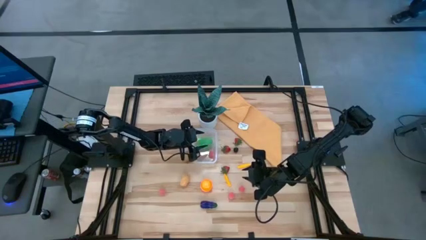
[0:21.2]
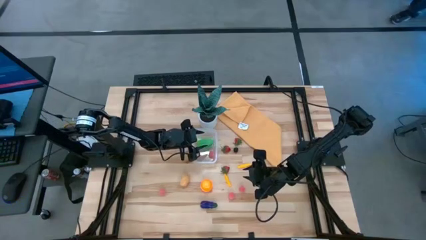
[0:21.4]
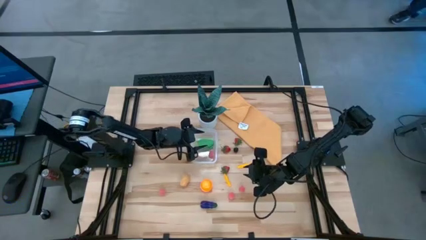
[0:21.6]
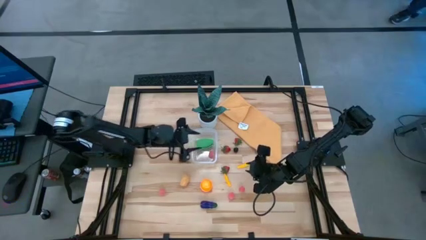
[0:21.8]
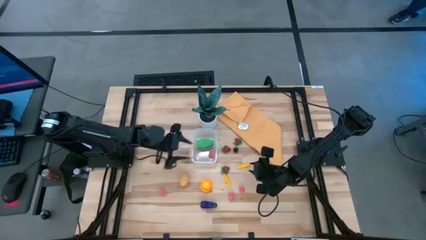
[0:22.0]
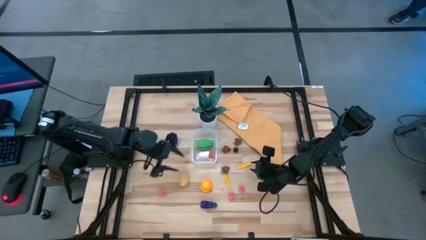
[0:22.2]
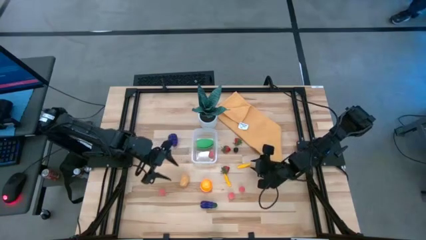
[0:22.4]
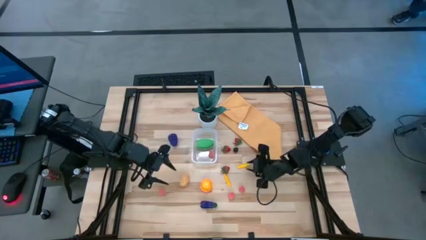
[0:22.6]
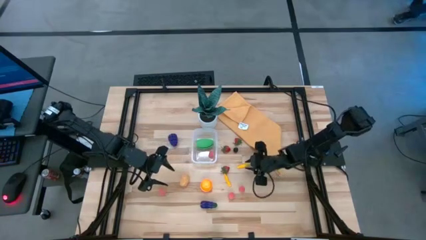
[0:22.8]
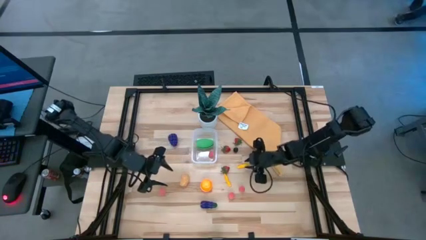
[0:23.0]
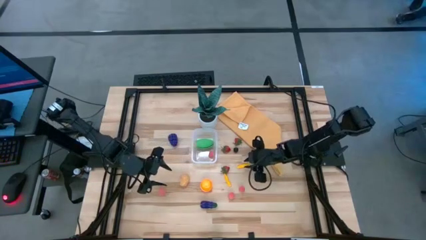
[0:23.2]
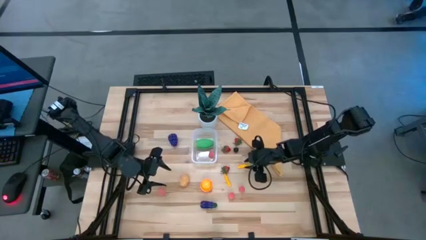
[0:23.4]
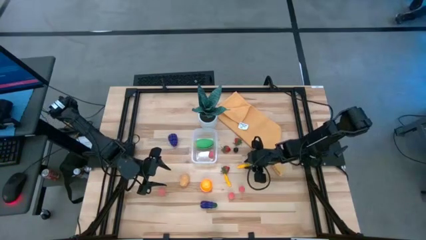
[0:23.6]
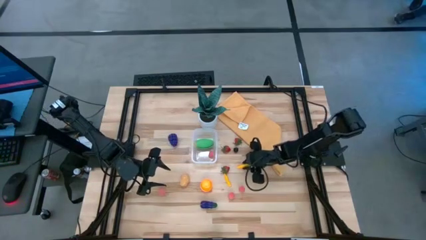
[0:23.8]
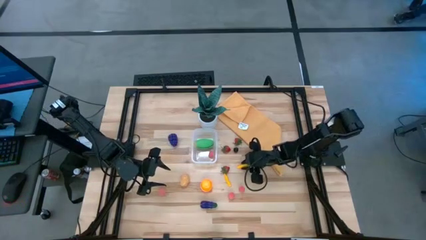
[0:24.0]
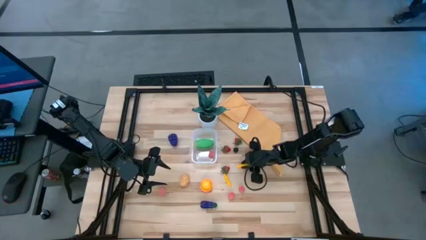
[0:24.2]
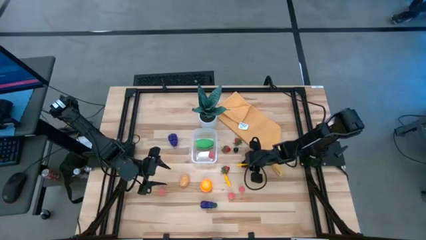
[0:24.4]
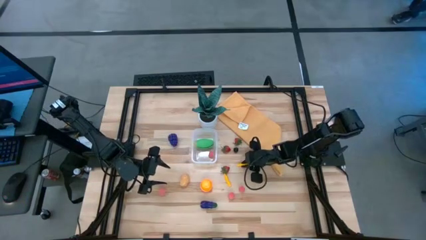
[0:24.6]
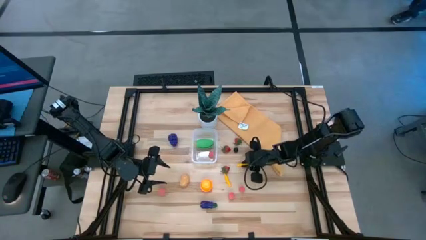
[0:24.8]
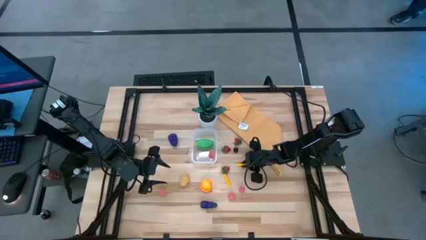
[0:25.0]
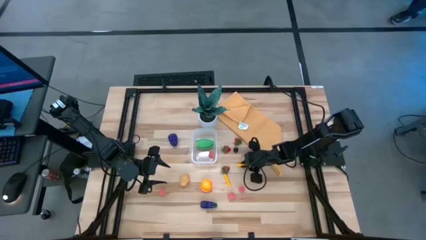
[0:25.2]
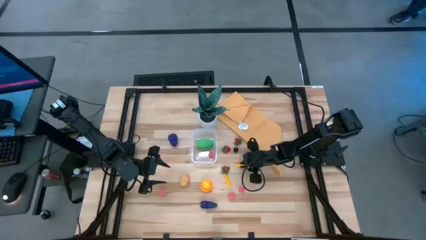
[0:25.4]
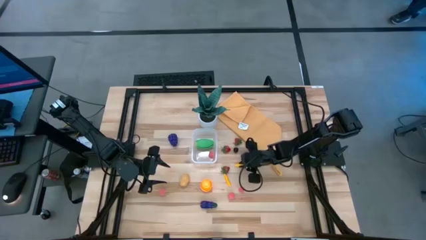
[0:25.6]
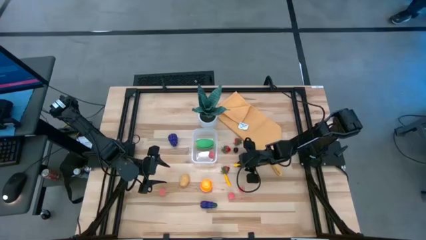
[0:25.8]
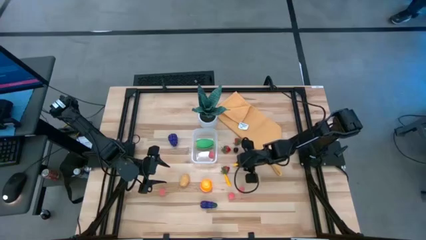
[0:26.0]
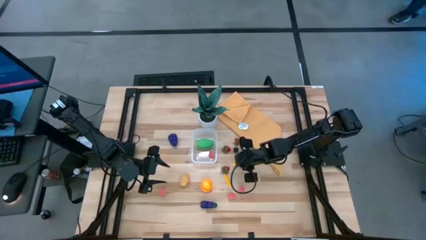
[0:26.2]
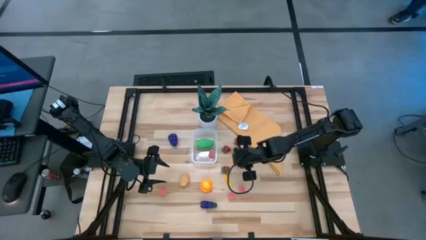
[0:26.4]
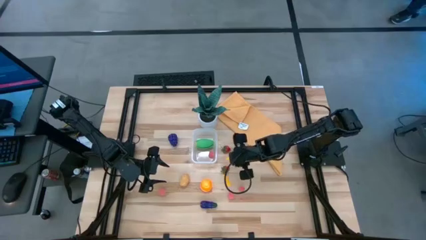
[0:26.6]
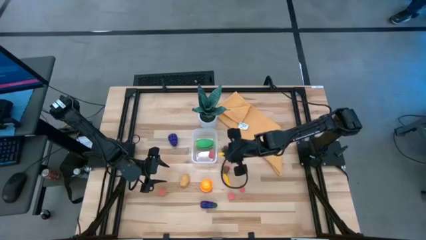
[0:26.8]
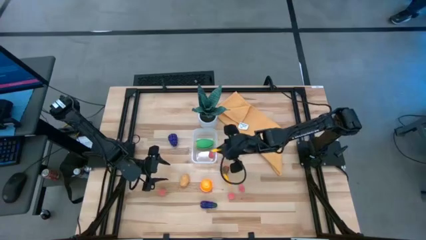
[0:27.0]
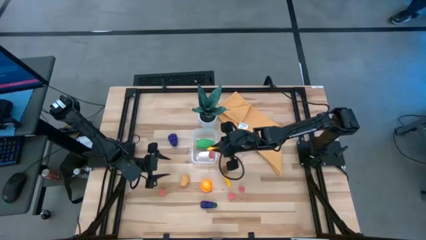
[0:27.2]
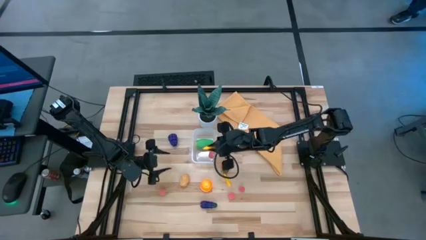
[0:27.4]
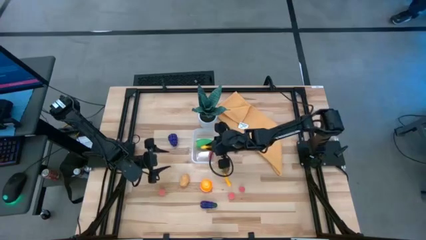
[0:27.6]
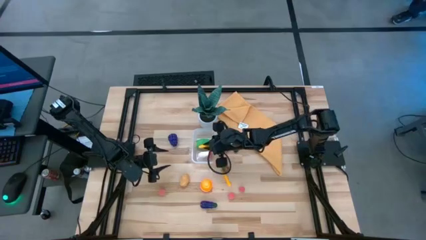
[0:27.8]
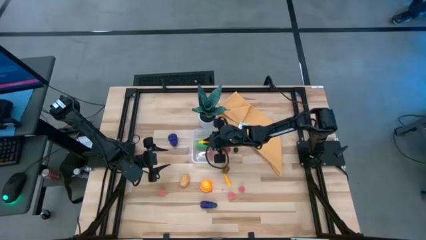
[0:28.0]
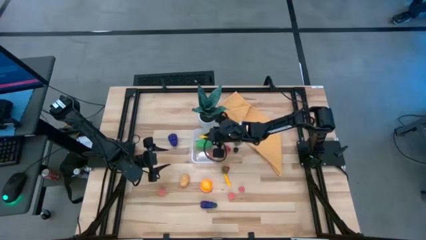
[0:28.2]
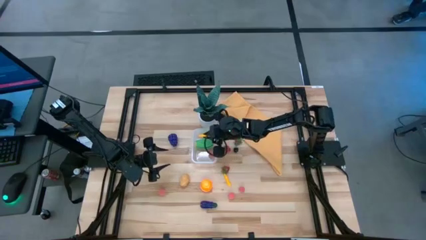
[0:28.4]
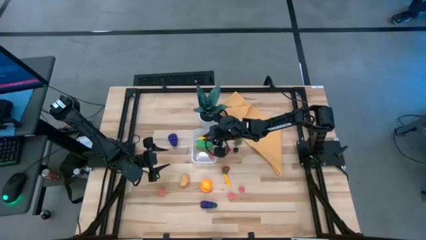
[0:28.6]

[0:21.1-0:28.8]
Task: Pick and placing Produce into tupperware
Put the top yellow corn into the transparent bin

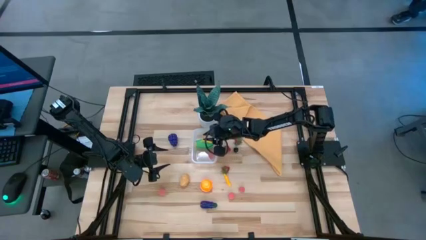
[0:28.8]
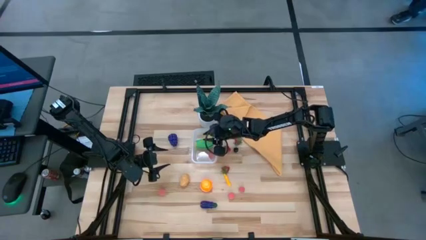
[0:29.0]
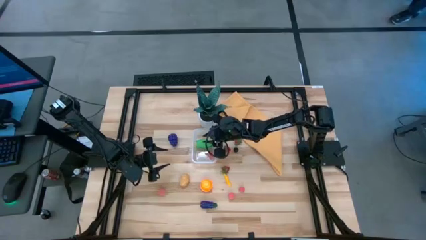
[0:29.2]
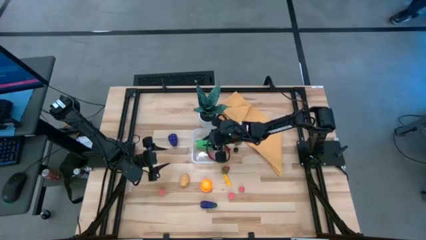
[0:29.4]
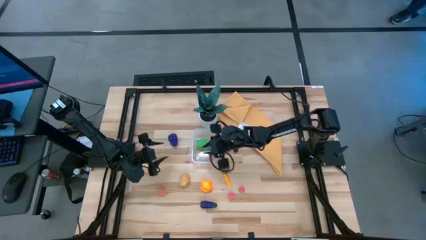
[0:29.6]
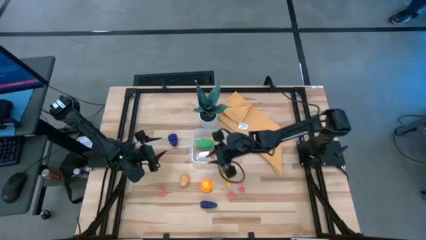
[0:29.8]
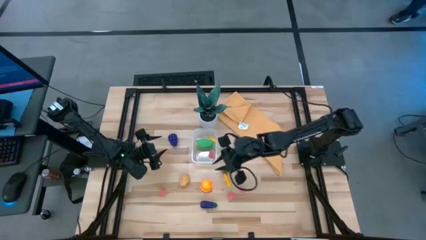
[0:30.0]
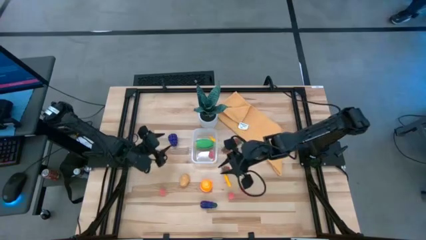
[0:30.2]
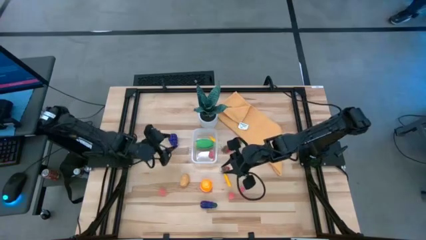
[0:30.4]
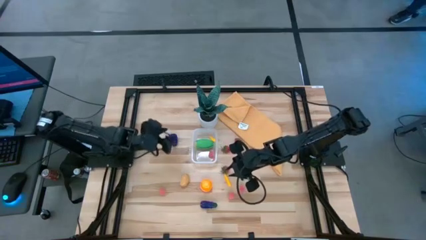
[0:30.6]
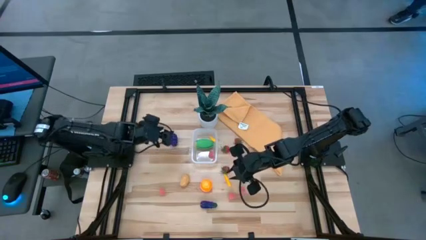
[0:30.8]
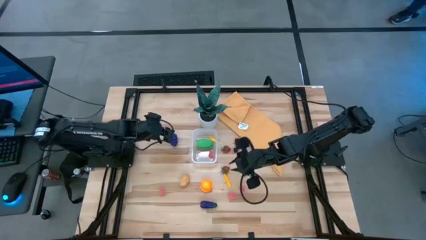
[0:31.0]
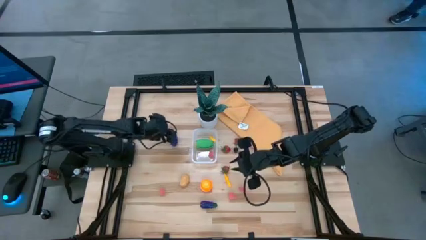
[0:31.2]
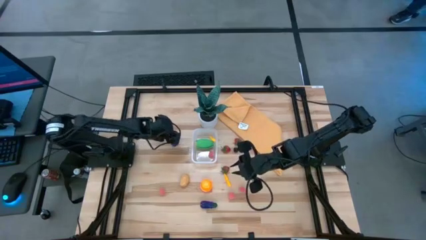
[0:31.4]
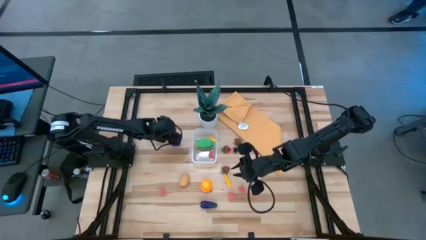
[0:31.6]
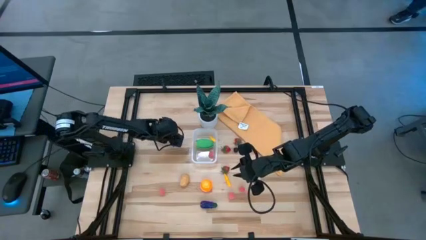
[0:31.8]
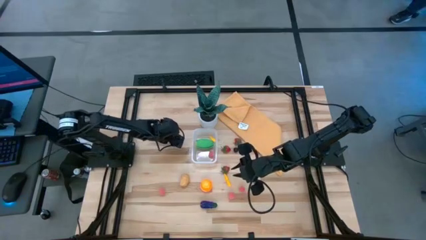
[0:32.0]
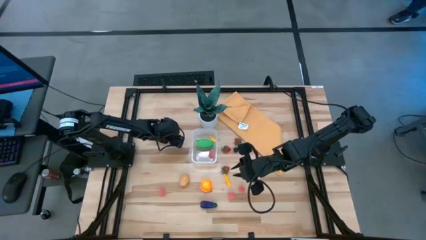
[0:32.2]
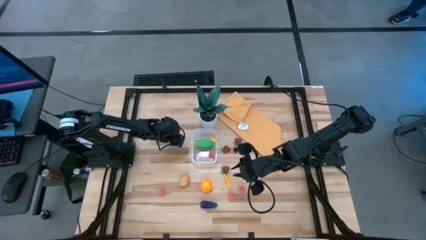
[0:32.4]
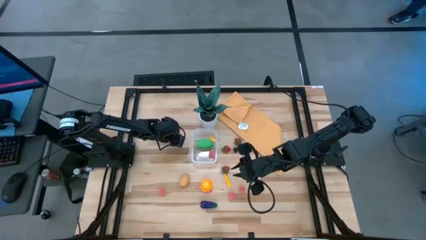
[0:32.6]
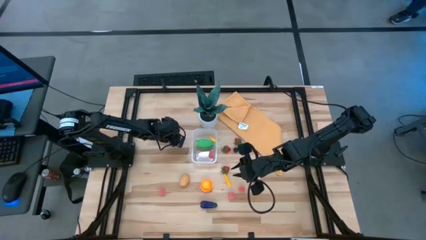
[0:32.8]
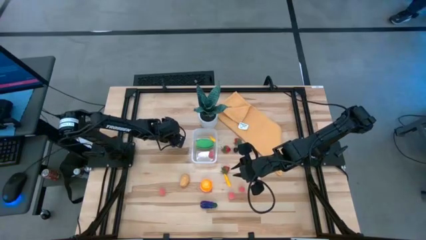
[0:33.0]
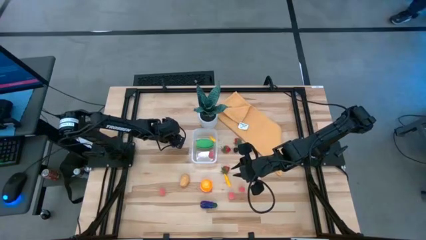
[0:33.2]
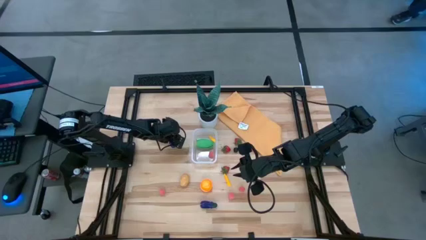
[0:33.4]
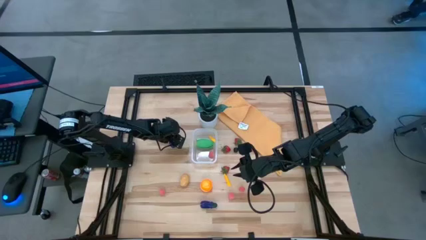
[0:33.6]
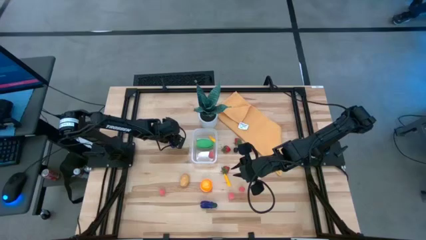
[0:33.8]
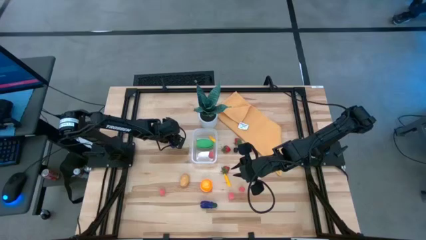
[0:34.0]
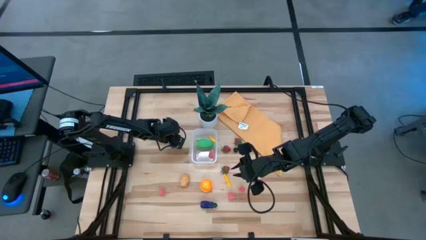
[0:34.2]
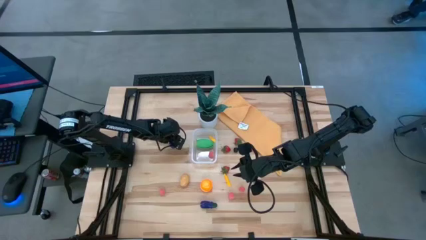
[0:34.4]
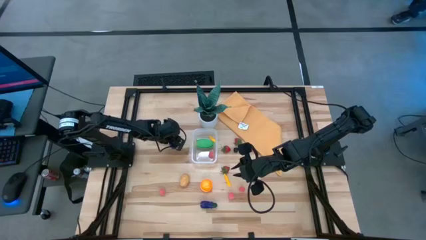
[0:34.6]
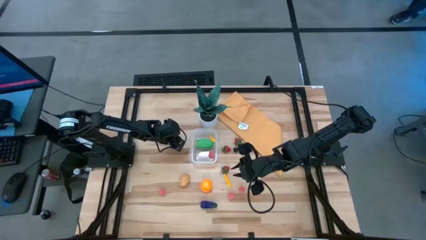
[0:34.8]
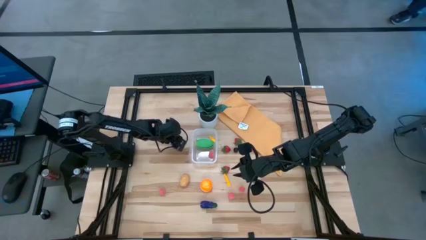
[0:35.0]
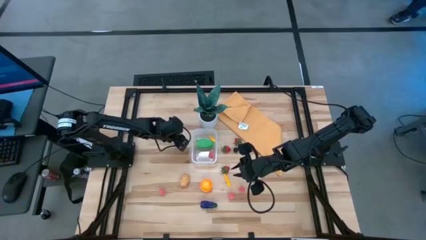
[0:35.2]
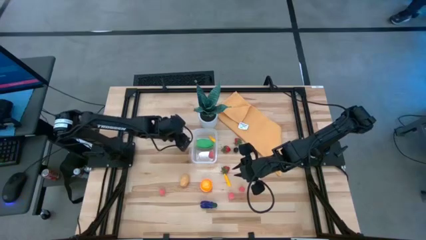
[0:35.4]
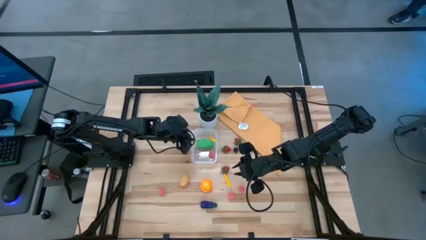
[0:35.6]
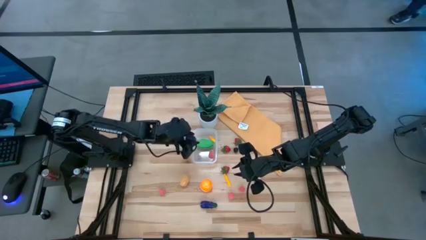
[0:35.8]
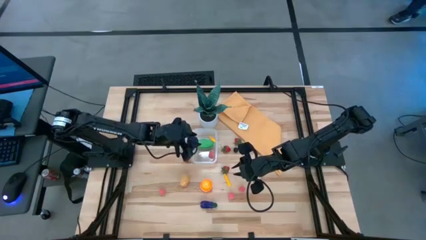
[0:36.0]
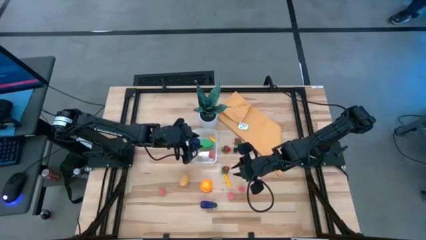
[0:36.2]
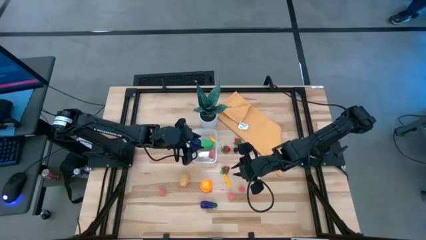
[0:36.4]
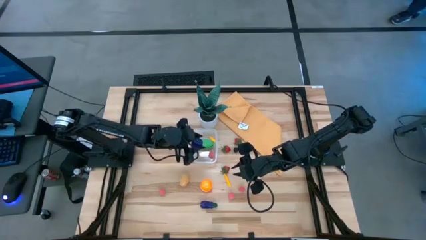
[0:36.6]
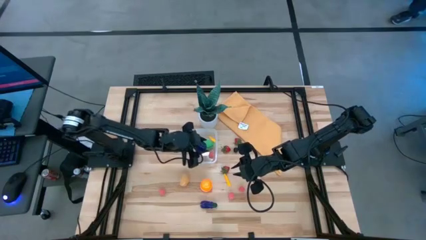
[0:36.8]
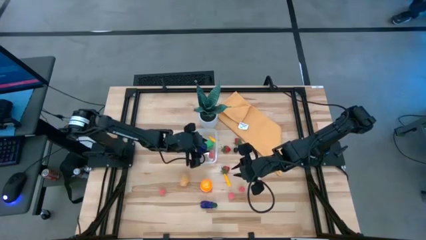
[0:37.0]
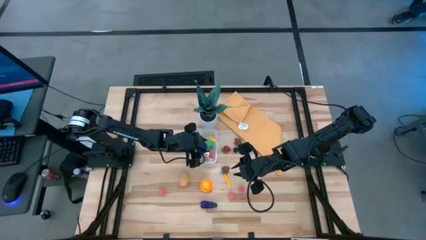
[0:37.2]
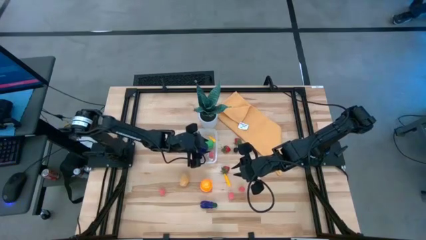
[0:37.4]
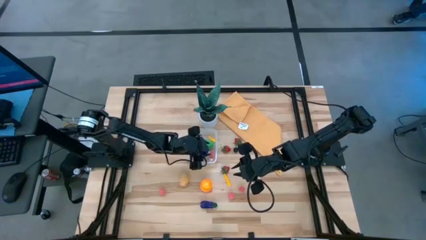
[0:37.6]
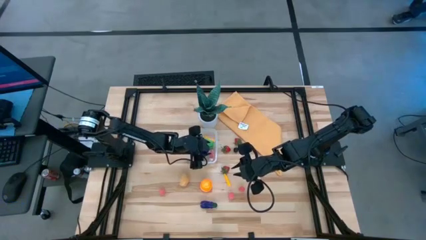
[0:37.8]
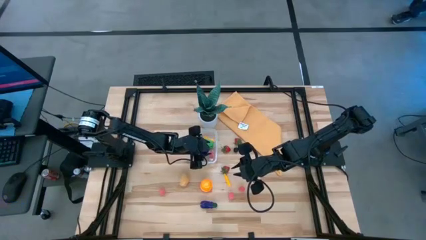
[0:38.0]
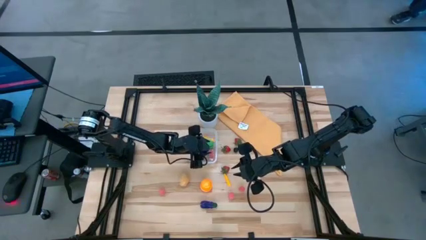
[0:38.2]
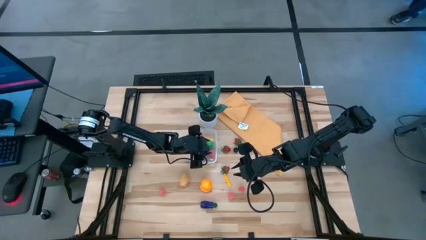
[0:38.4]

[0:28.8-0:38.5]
Put the blackberry into the transparent bin
